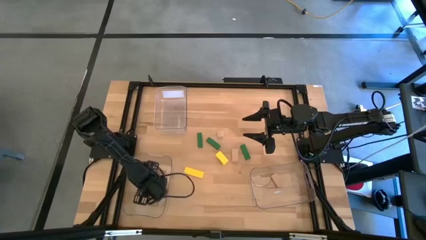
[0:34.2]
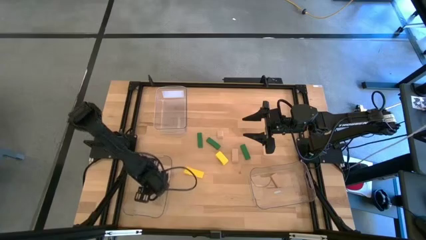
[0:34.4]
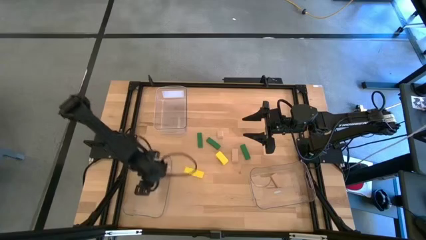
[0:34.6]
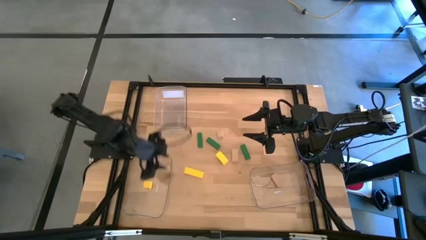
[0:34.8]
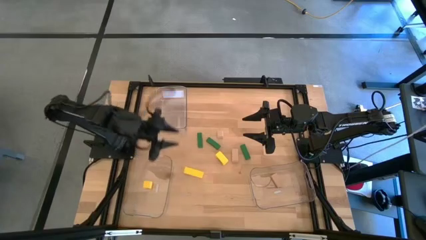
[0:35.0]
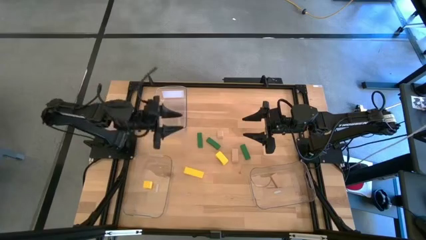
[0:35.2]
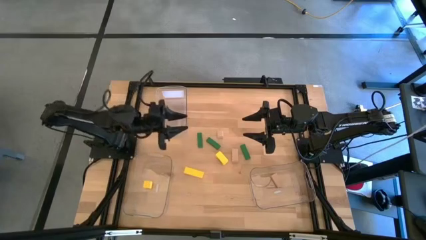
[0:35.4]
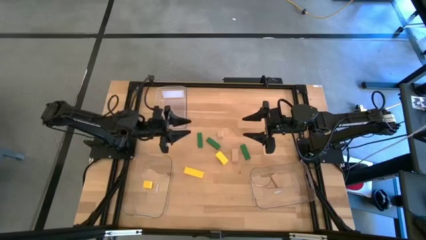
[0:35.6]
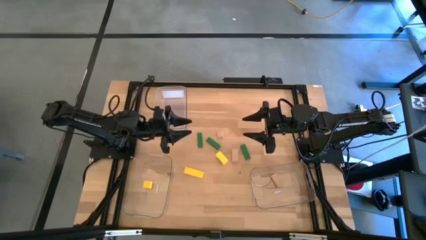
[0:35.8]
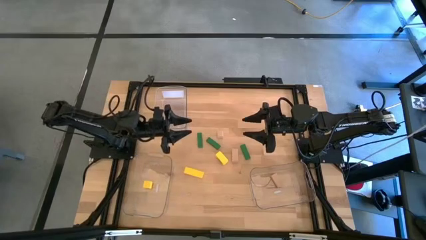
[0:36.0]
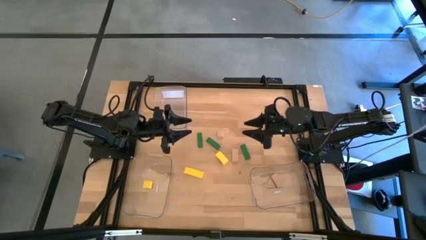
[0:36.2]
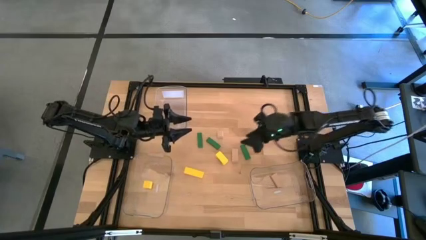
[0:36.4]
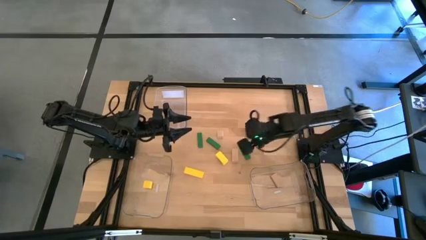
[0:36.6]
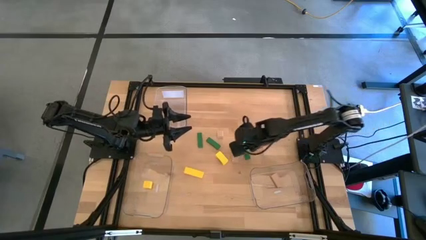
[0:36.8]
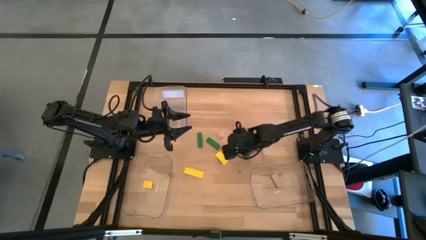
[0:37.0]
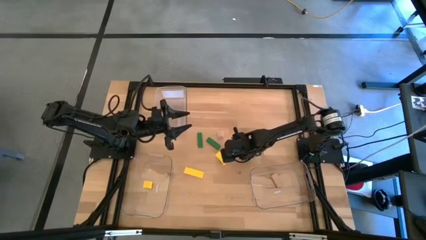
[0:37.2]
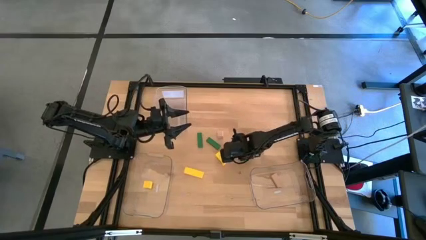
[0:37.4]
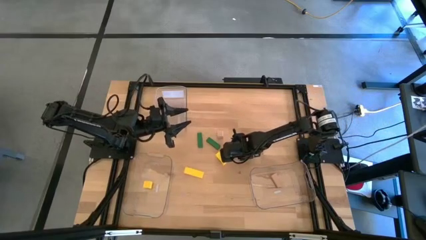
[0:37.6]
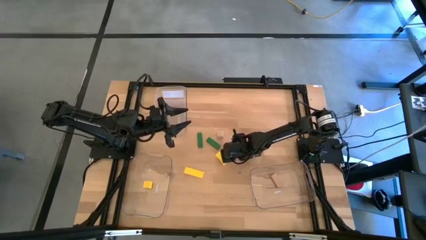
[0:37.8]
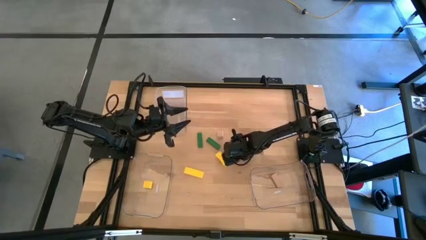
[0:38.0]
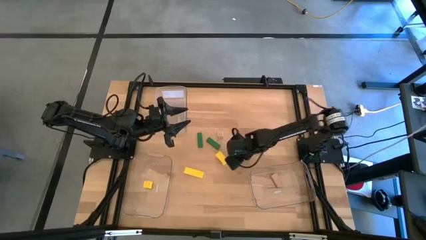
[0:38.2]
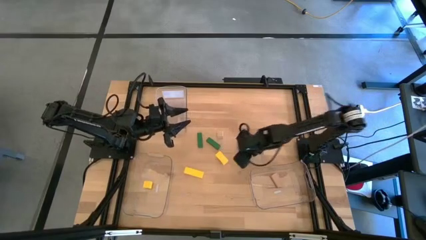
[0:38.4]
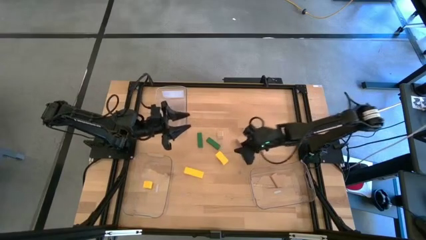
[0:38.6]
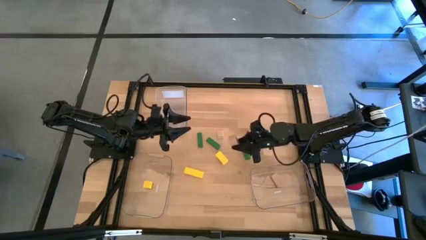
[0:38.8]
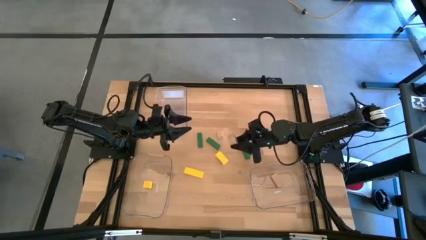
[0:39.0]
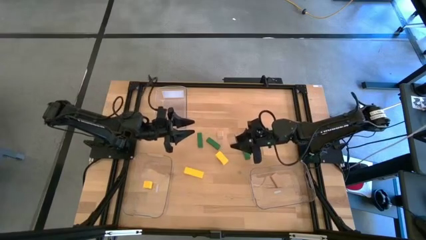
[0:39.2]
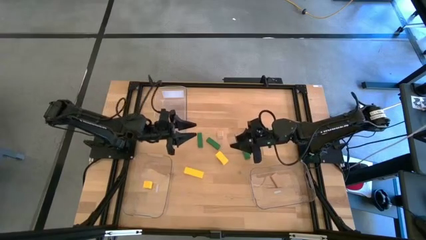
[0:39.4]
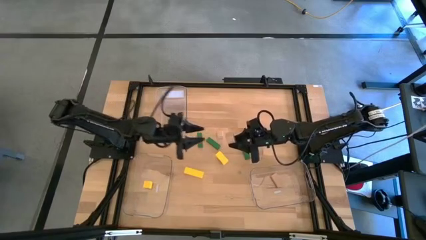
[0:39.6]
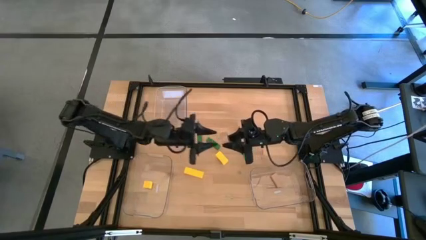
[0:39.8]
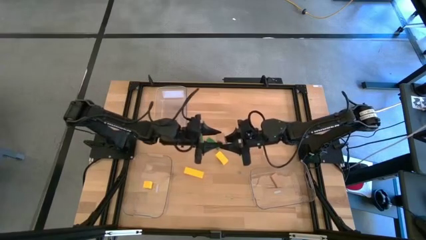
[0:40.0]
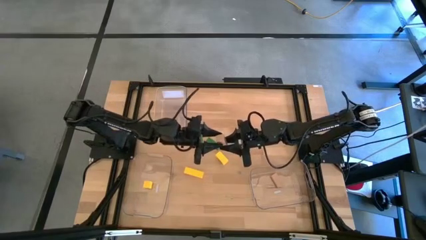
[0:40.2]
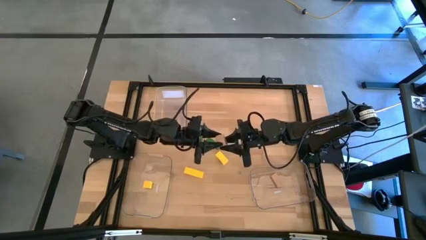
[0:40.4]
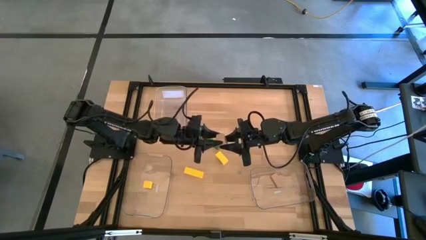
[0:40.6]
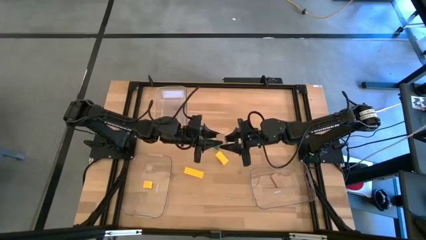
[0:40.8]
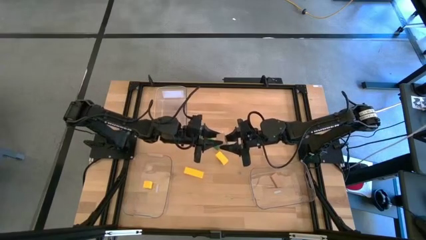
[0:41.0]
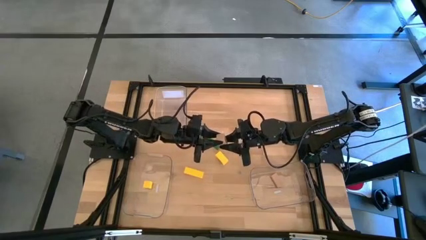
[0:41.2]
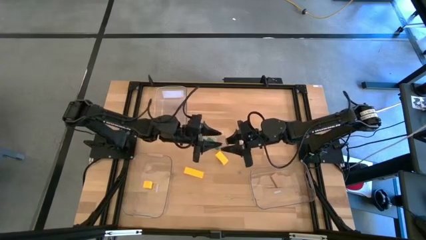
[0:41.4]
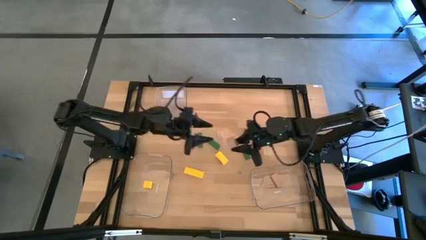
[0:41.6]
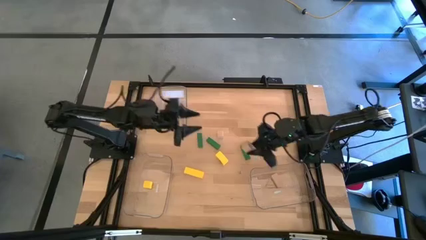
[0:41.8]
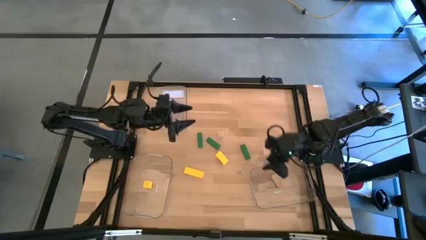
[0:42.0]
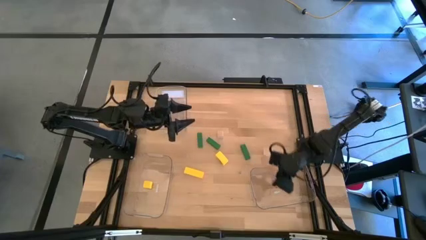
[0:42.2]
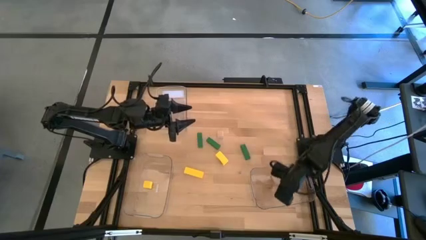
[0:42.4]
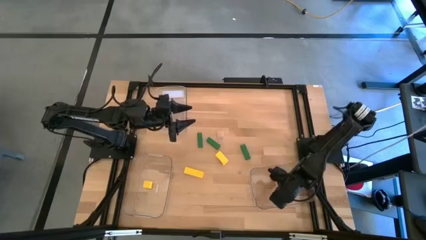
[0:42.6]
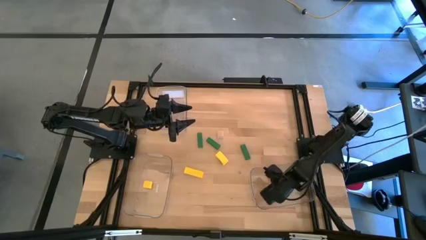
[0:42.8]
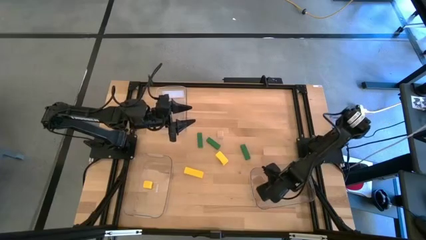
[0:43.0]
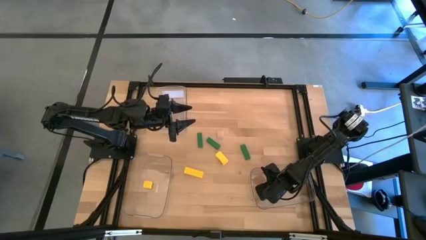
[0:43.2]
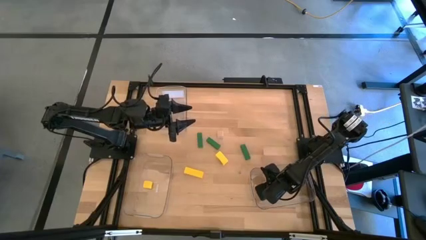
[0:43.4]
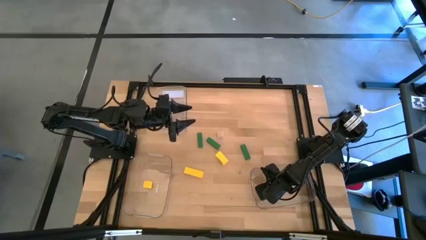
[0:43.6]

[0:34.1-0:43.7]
Task: Sort & place blocks by color
Put the bottom brown block into the bottom right transparent bin

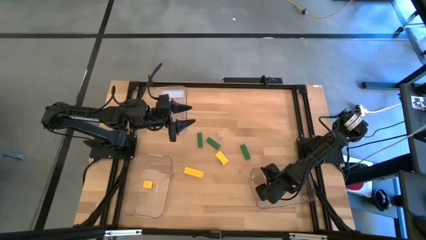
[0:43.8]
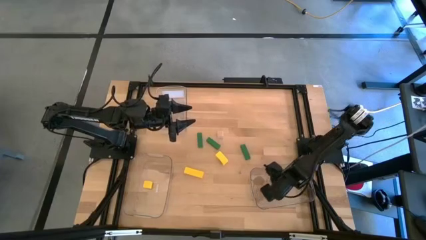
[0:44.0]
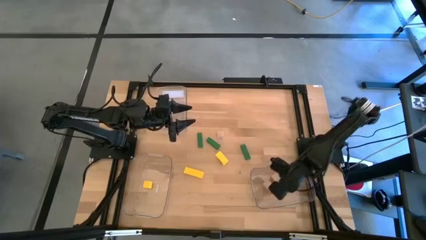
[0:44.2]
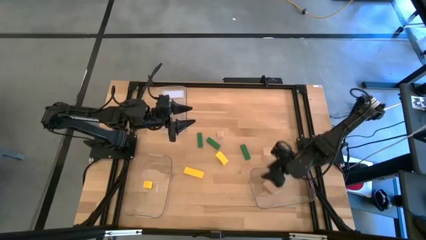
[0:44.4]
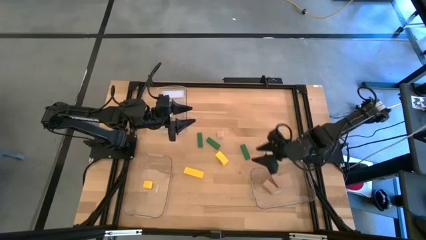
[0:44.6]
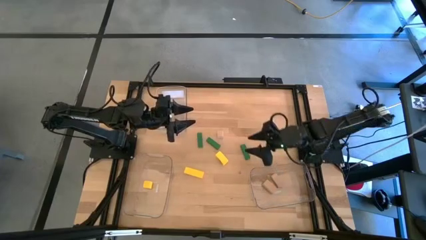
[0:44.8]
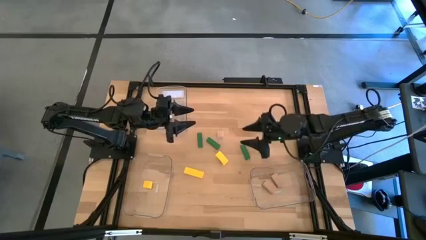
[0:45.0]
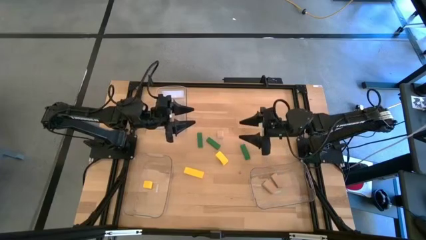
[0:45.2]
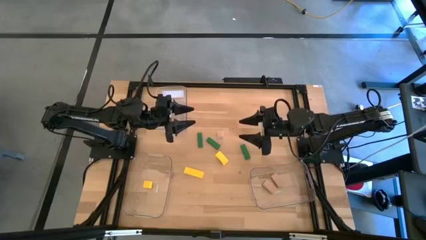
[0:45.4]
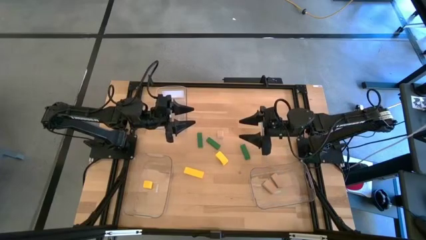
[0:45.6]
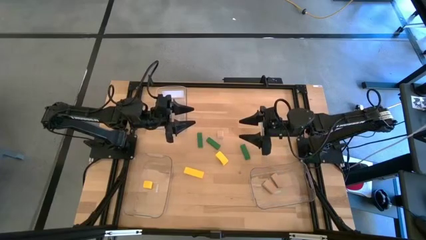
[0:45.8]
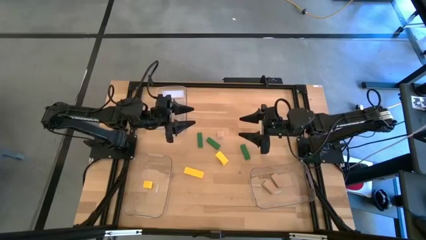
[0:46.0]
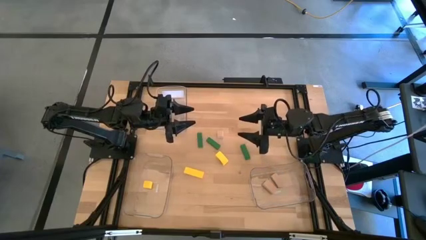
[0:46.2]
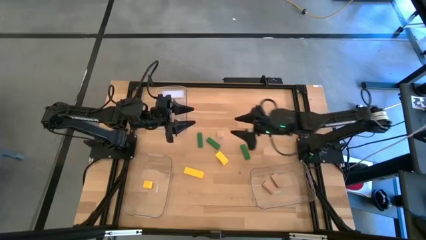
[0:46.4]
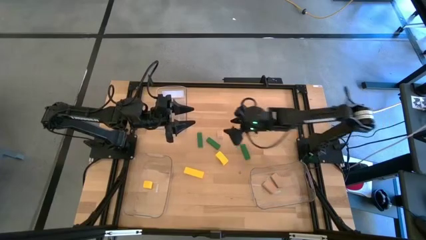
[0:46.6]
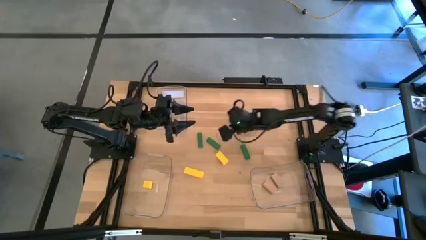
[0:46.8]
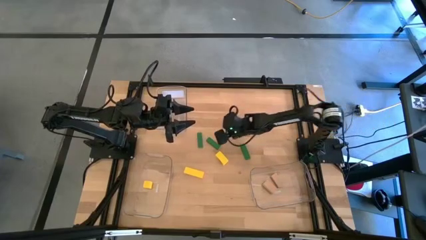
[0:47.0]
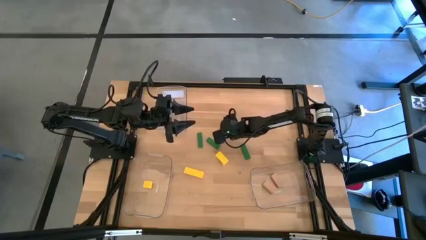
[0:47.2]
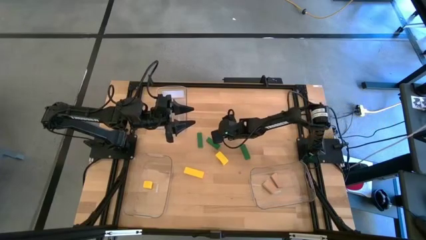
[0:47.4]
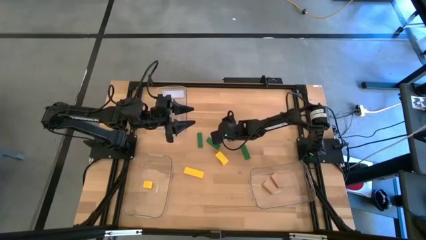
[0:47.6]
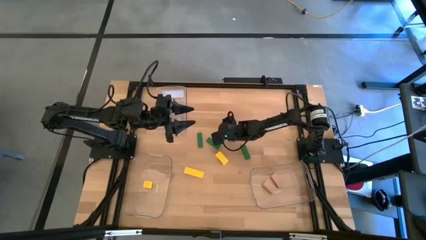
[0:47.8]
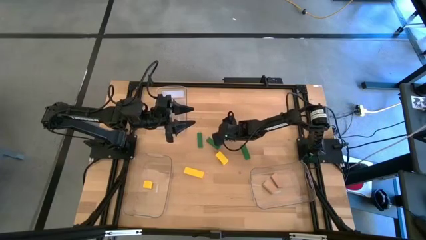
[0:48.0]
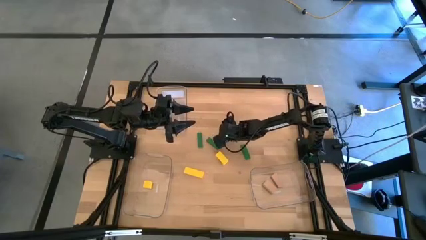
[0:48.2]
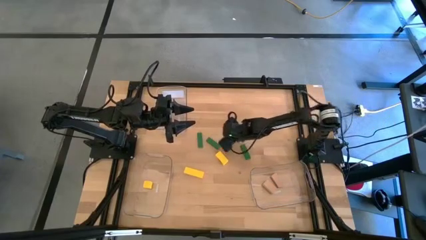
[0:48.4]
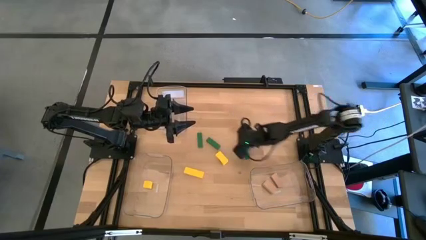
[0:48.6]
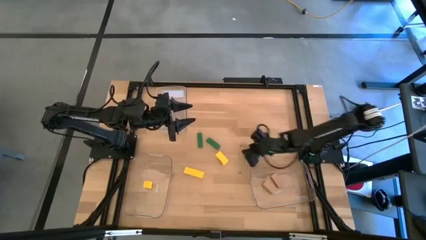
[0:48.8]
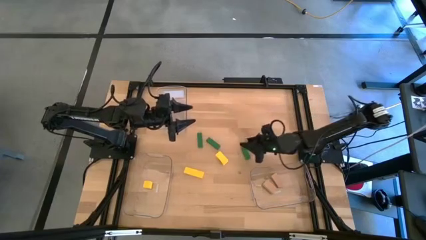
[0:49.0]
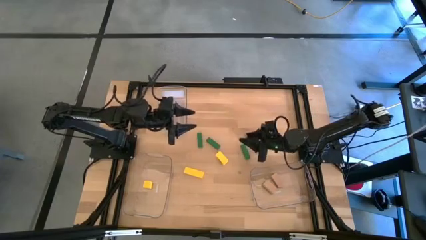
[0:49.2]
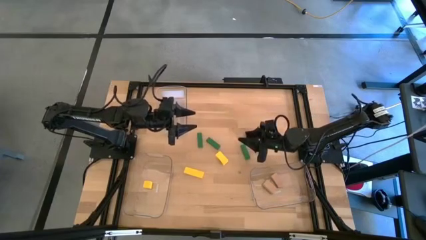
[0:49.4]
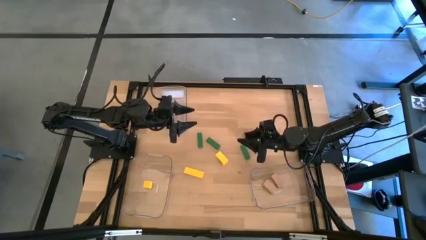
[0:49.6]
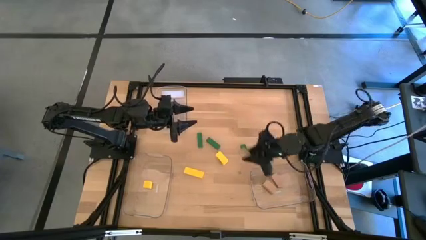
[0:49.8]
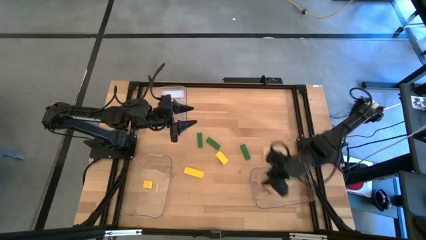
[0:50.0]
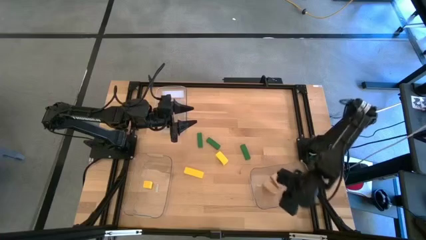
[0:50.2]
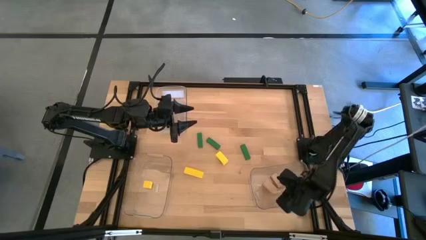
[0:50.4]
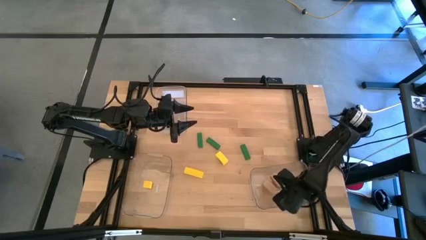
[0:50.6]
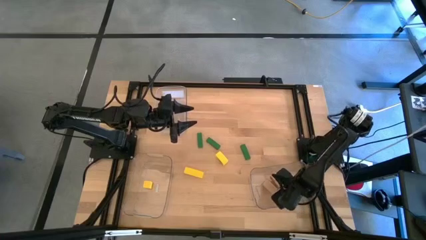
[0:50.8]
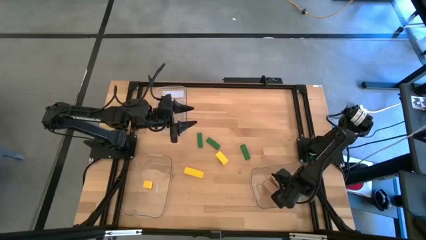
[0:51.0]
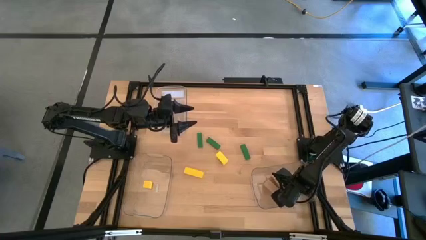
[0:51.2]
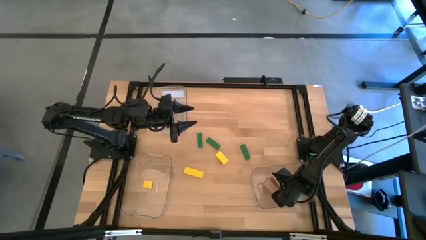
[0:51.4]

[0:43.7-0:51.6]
Put the brown block into the bottom right transparent bin
